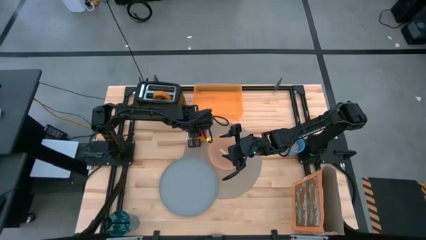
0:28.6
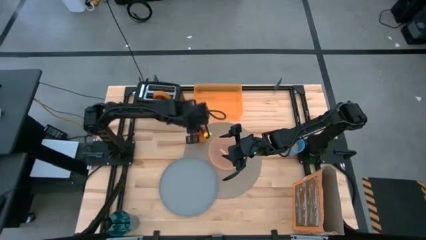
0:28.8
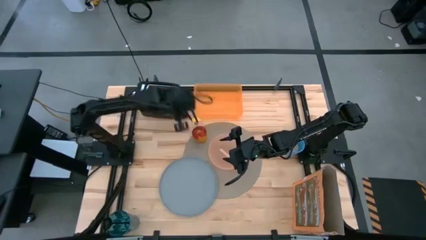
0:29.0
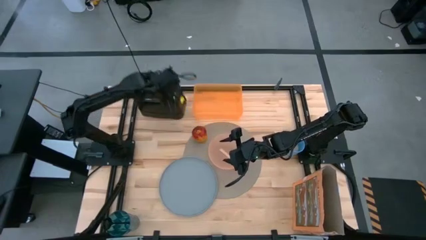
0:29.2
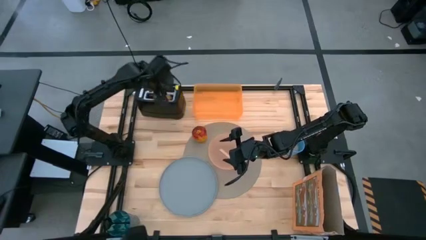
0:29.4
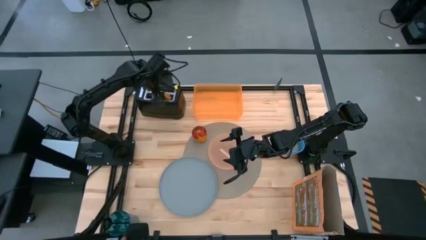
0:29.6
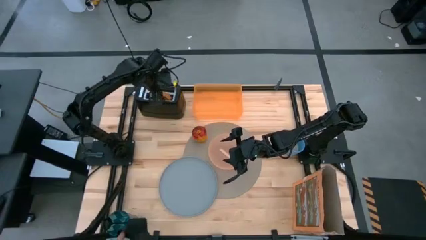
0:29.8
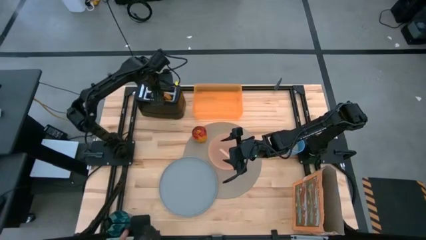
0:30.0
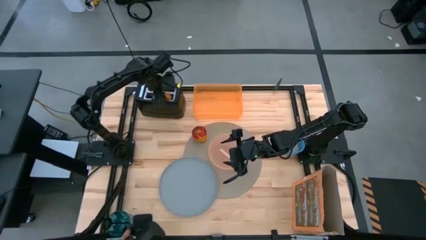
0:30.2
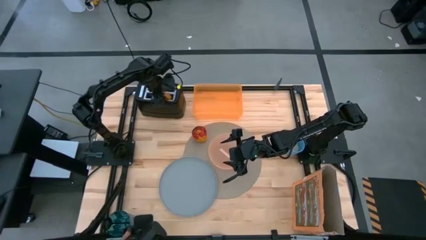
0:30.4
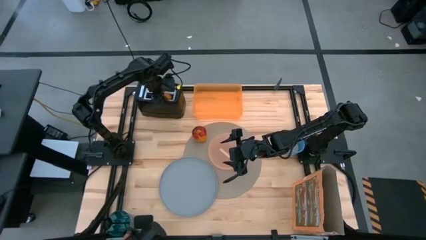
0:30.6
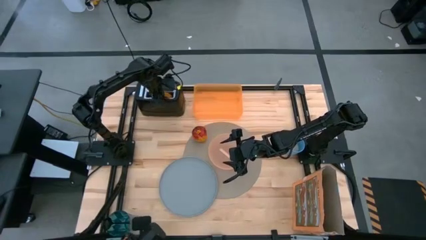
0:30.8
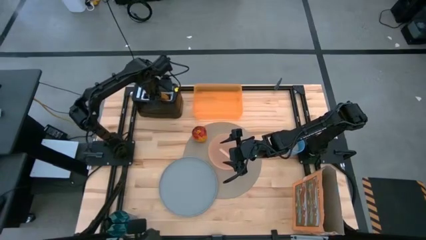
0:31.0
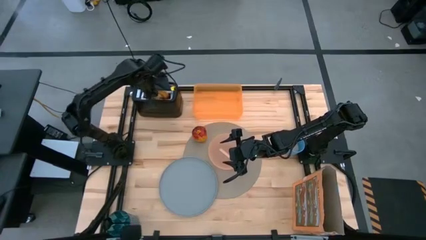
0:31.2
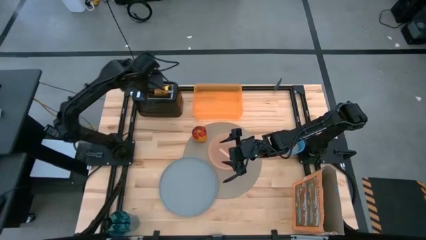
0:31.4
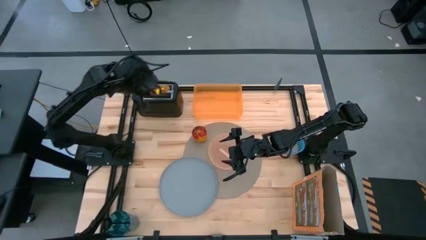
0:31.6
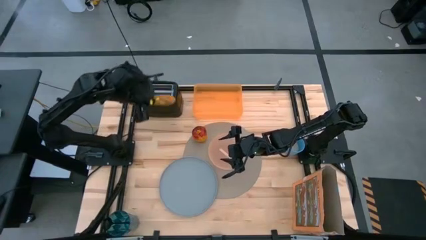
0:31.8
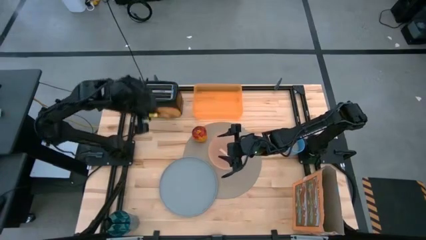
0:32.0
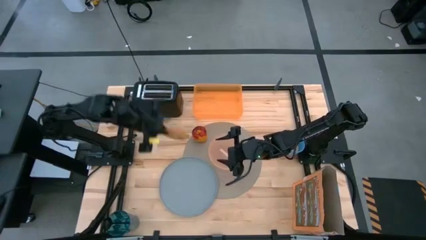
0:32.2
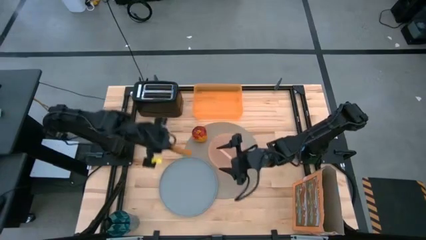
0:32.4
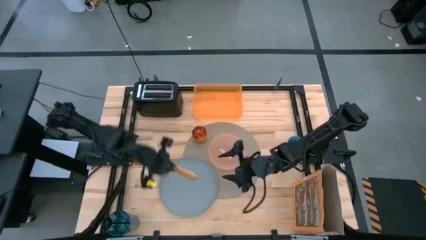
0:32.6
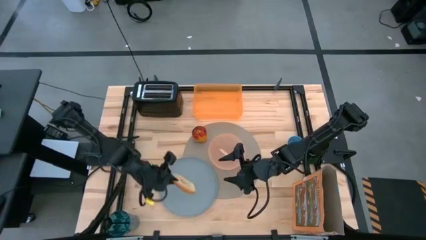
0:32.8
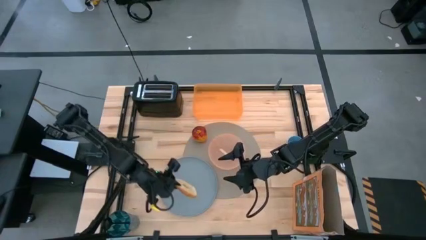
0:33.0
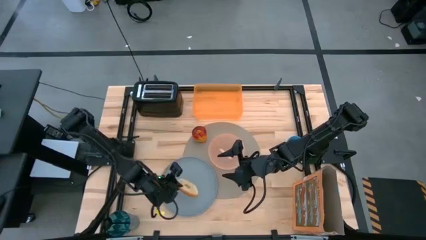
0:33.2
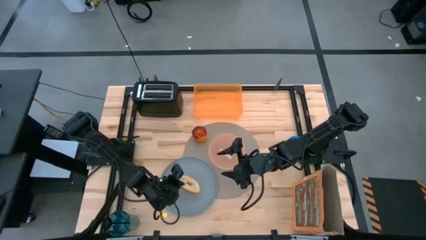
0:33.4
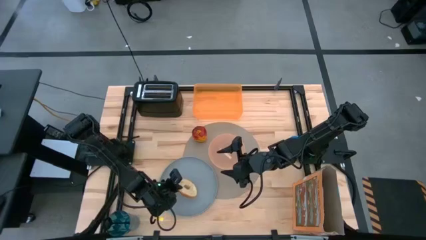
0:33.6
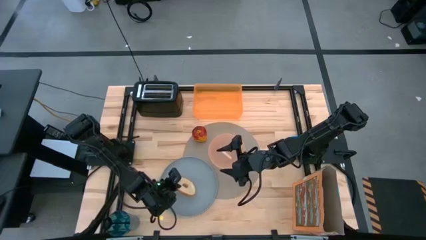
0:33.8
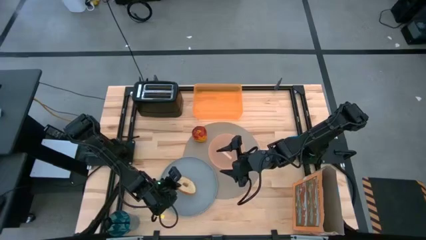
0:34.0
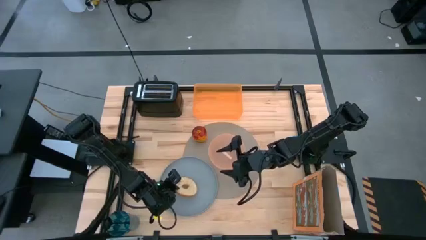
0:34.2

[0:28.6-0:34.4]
Task: Arrange a breakfast setting
Put the brown toasted bagel from the toaster to the gray plate

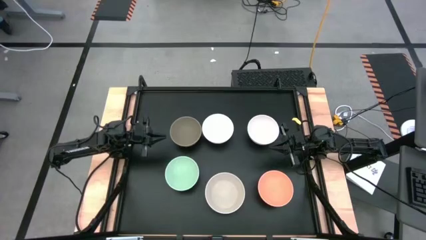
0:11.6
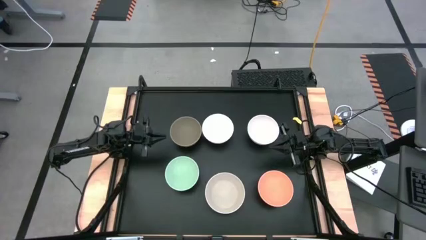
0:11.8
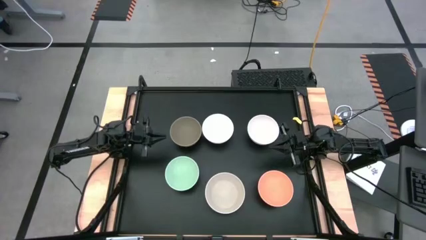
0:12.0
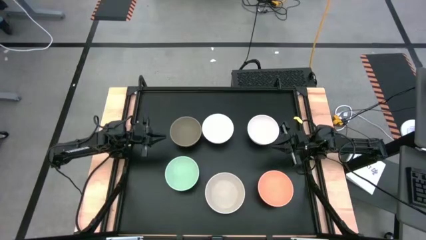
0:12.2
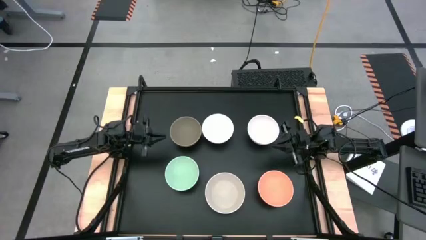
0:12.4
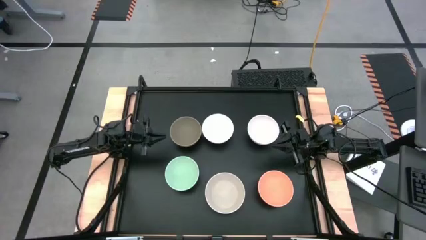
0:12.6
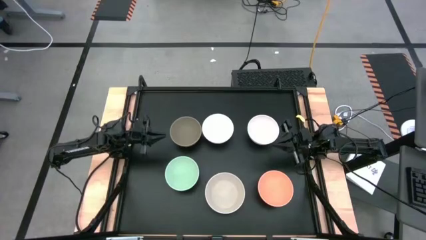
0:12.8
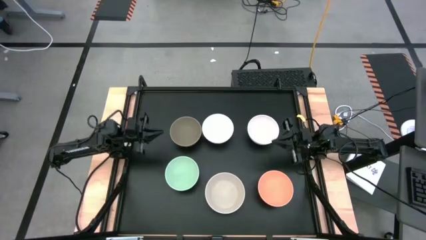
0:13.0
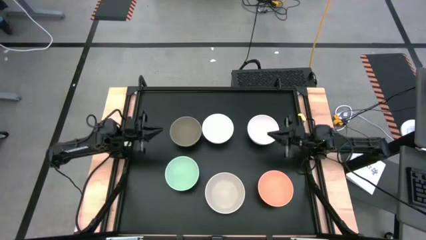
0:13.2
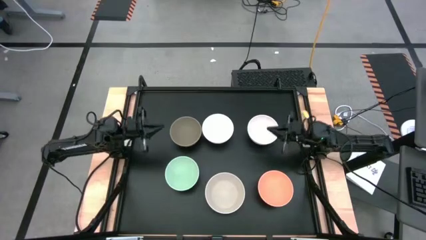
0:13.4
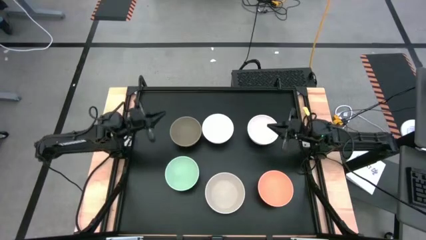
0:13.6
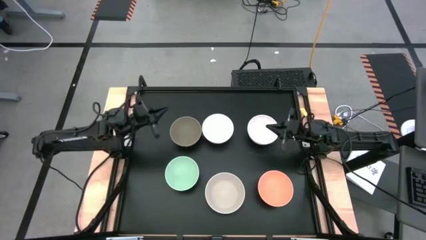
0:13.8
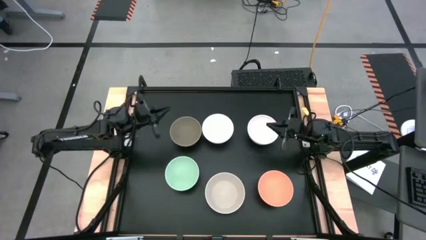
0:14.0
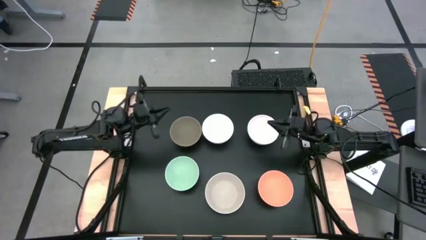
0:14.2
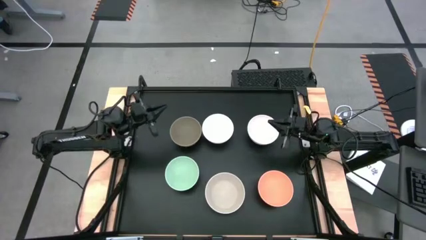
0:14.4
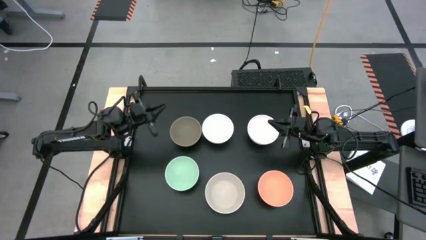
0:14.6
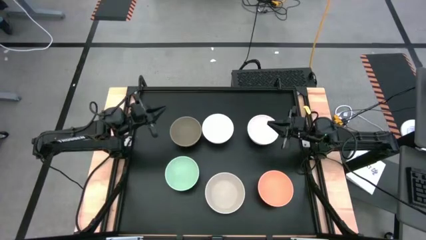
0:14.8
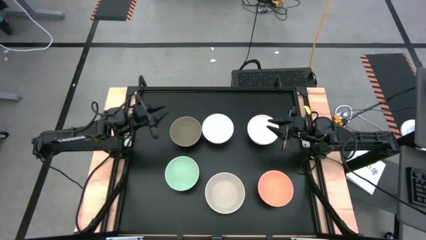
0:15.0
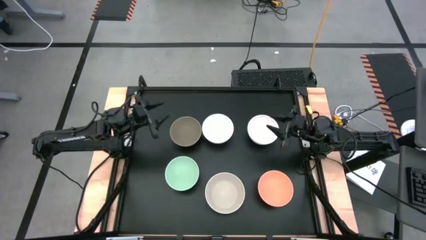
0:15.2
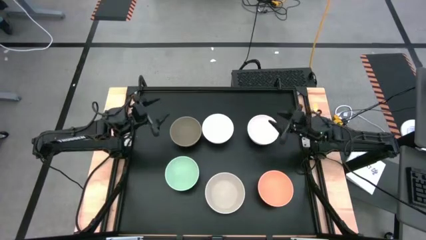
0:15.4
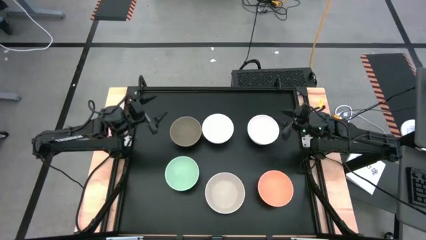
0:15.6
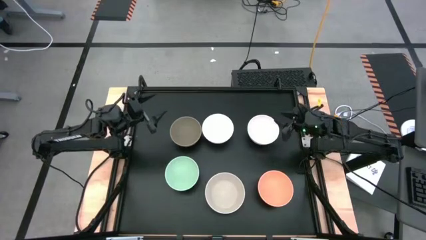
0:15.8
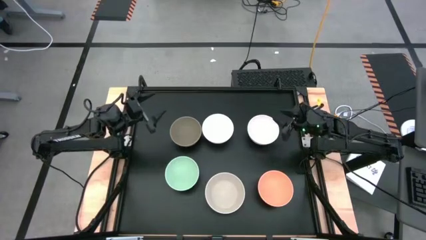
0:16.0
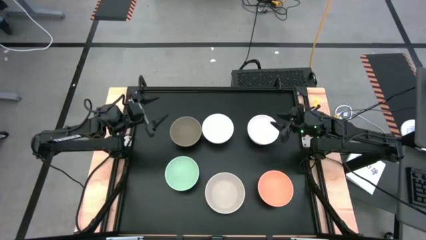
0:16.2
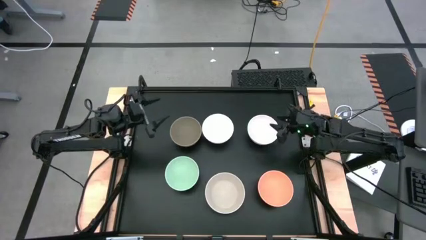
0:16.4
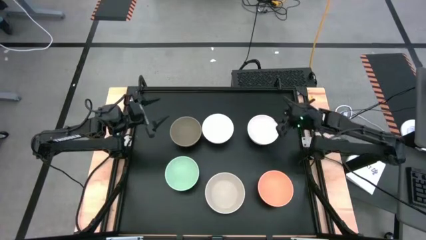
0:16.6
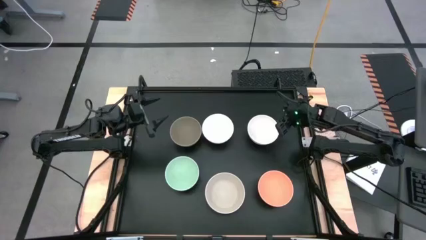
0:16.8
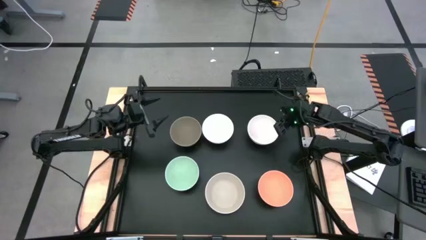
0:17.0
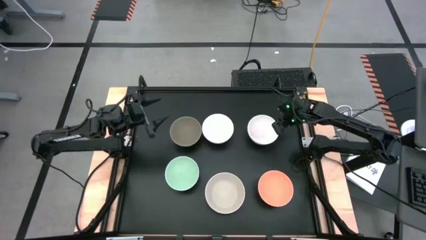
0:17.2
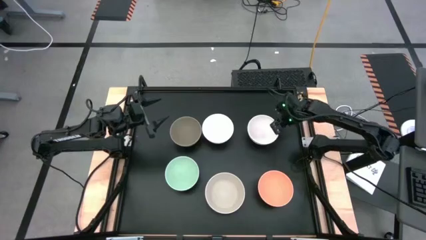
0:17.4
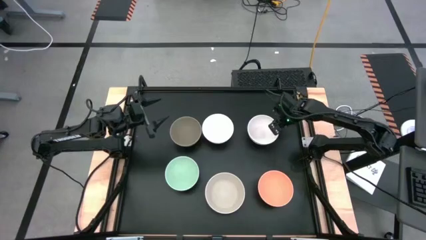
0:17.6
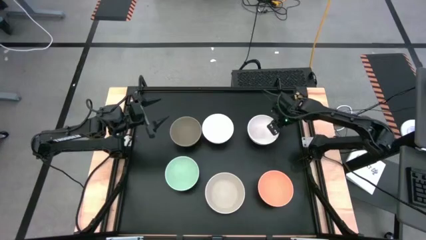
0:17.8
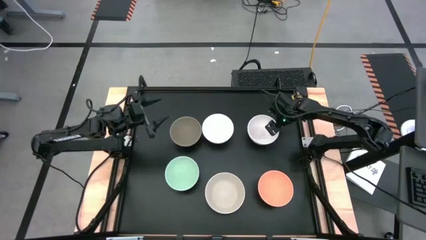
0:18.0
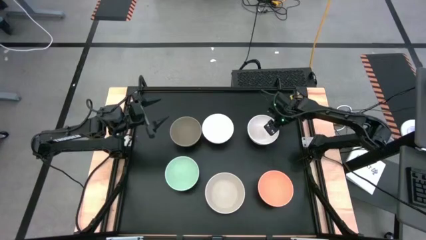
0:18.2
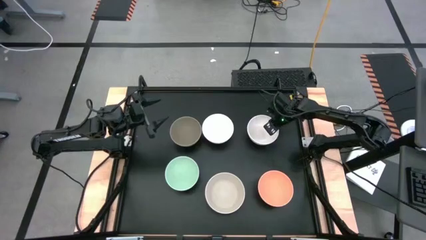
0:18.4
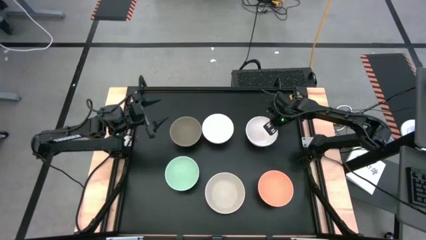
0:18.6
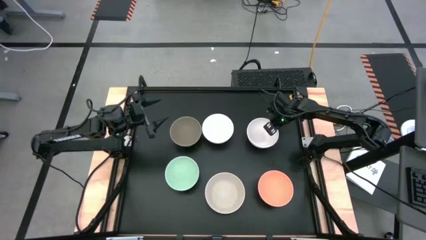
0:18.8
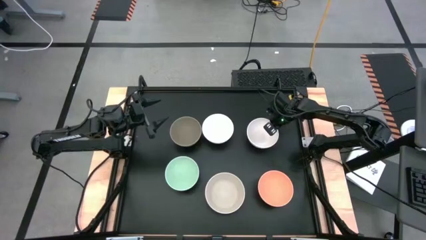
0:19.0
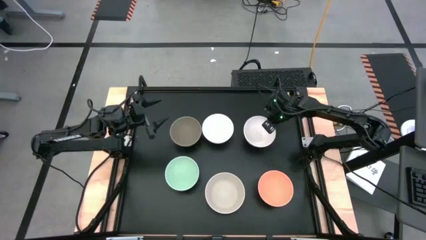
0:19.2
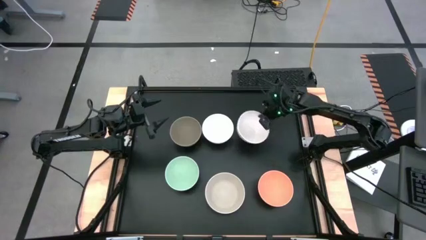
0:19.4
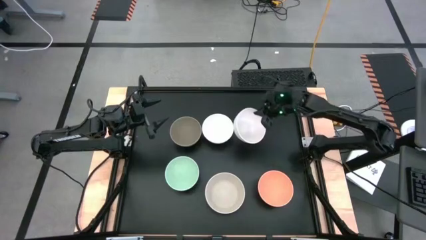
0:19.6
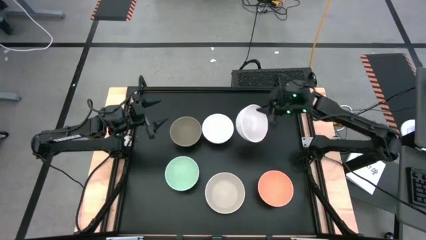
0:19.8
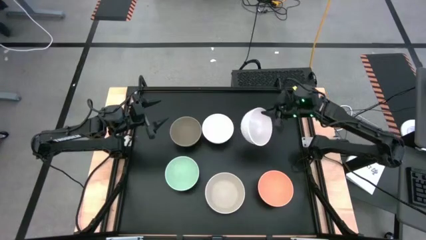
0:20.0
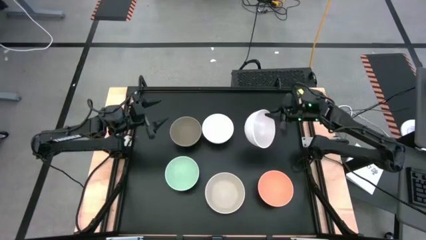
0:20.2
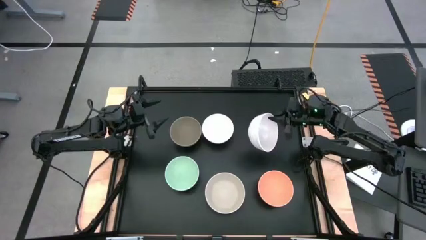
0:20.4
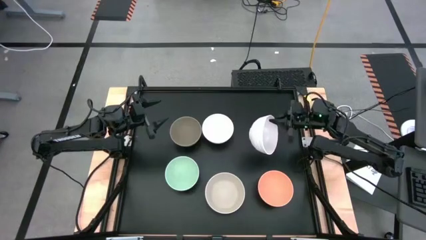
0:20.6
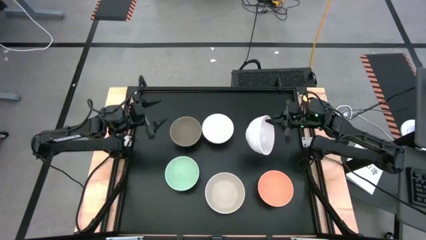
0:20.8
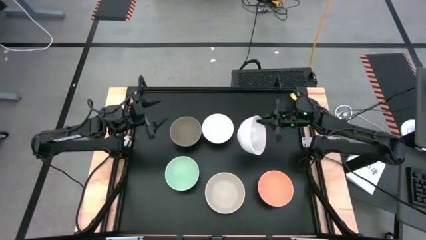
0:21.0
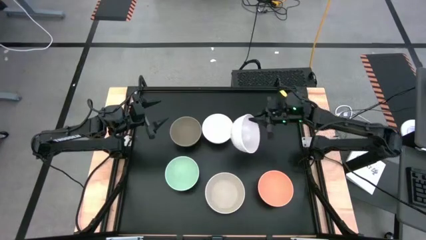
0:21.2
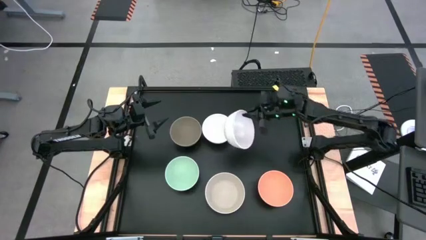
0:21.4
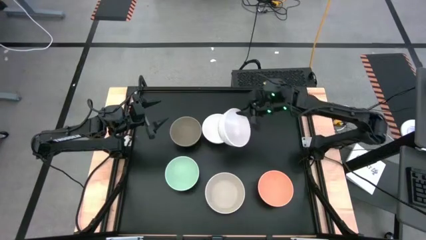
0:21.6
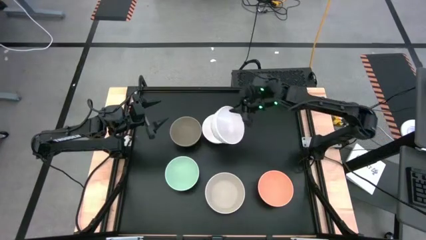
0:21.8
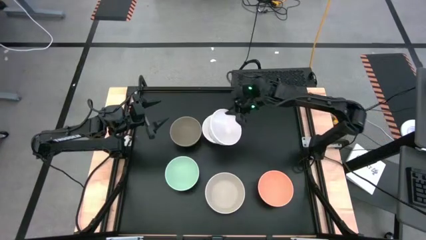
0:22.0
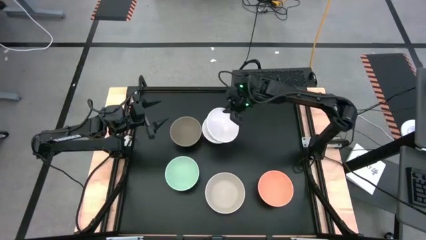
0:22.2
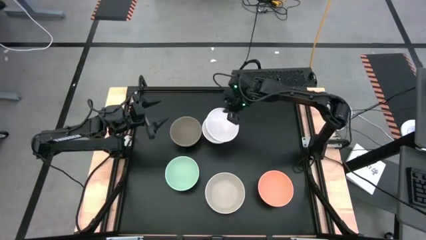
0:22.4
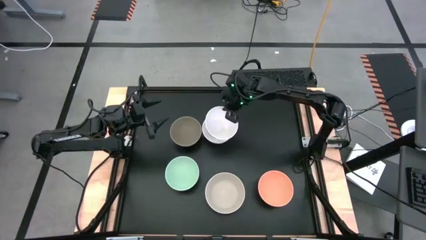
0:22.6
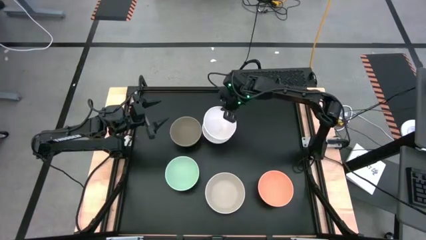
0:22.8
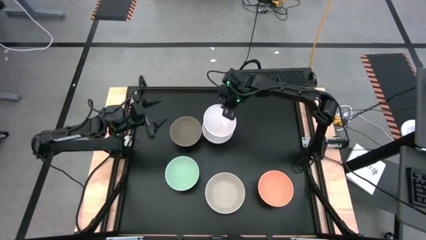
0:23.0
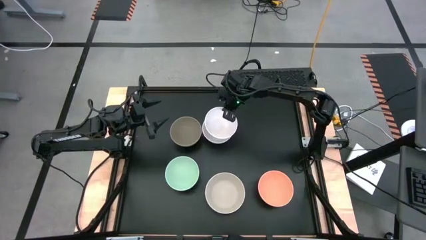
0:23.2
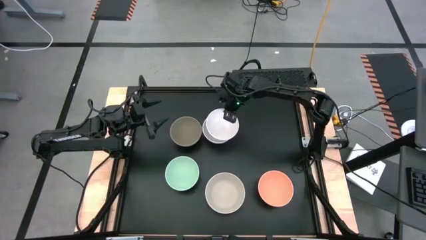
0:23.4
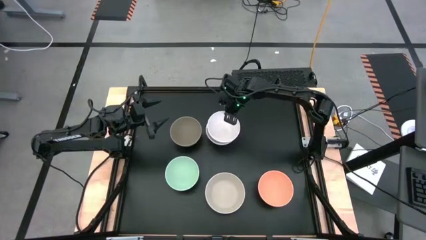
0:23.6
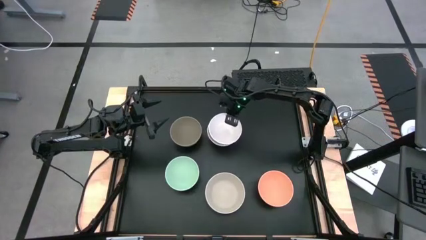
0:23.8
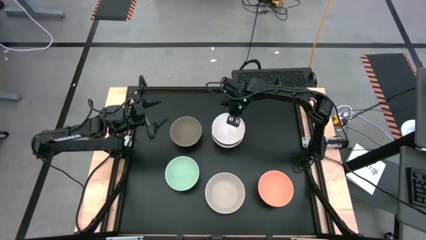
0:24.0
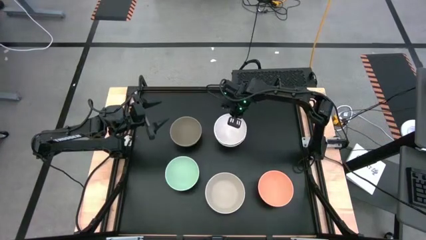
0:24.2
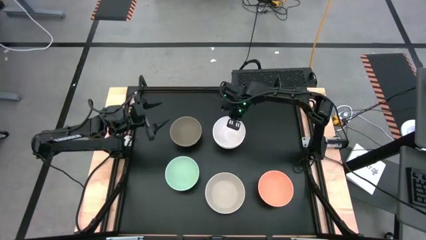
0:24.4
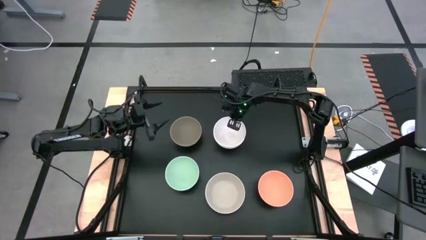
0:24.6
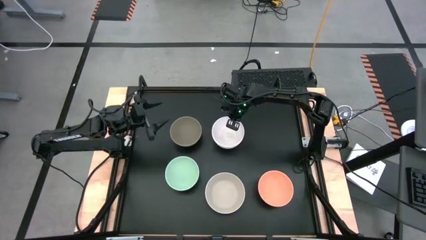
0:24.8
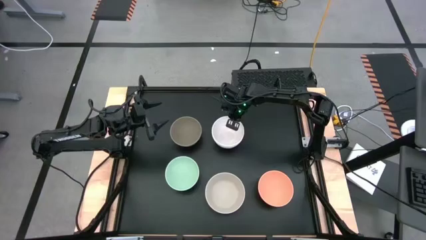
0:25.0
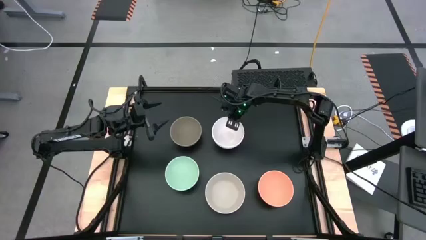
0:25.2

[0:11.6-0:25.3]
Task: Nest bowls inside each other
Stack the top right white bowl on the top left white bowl
